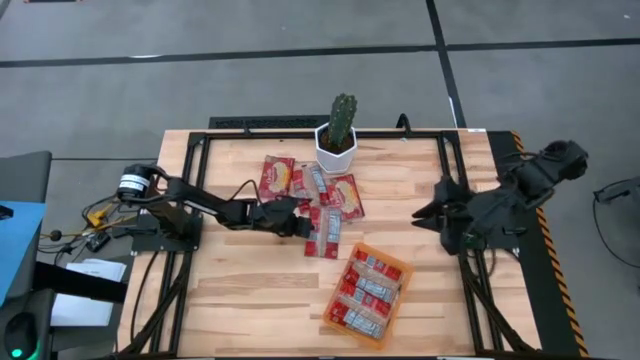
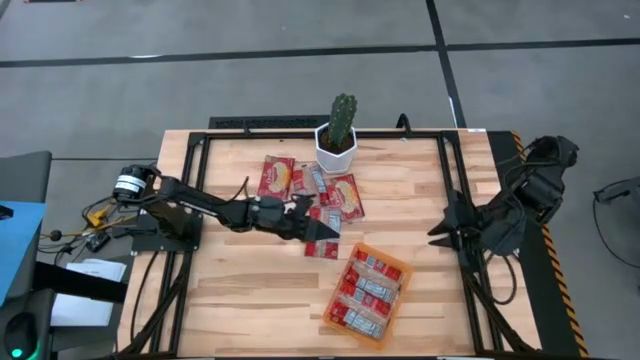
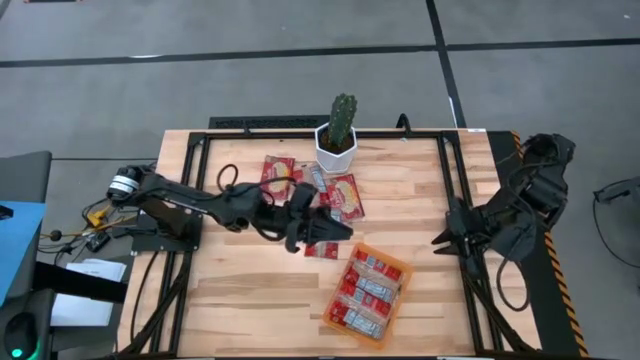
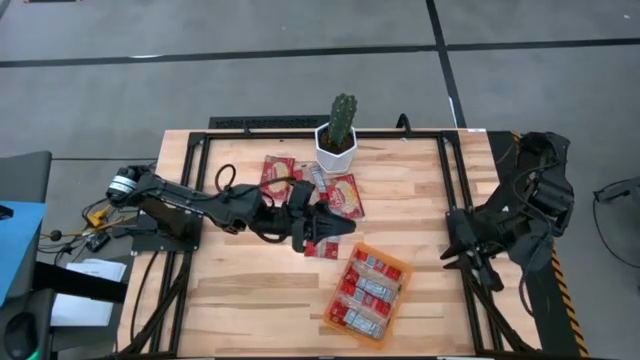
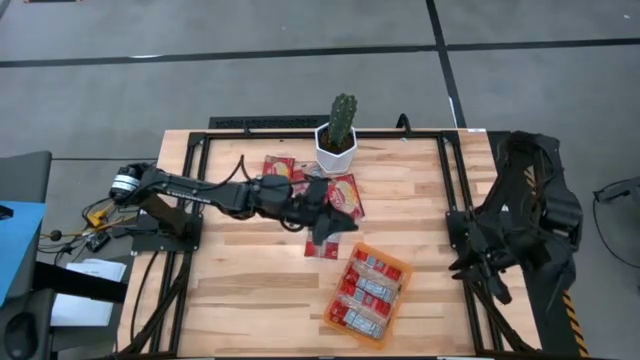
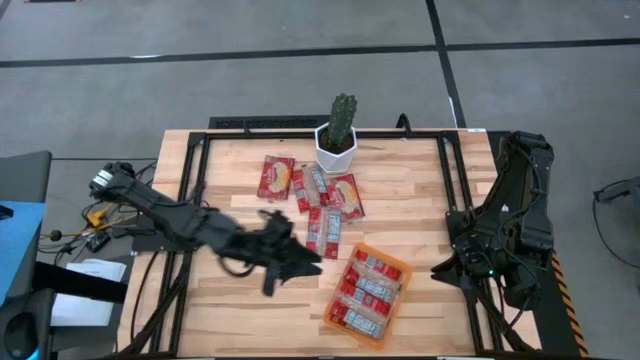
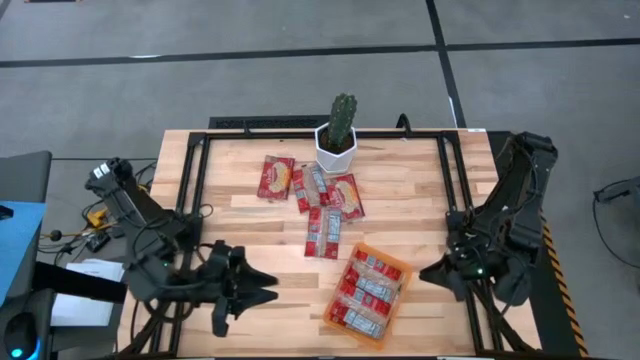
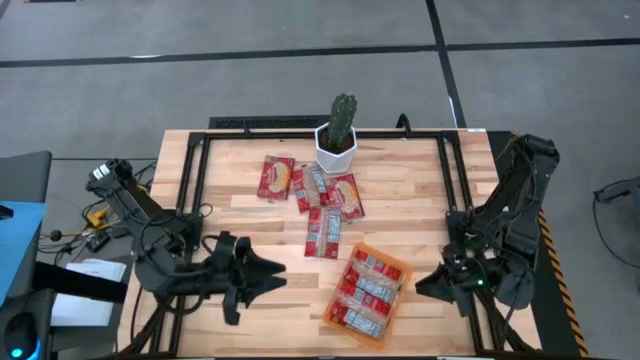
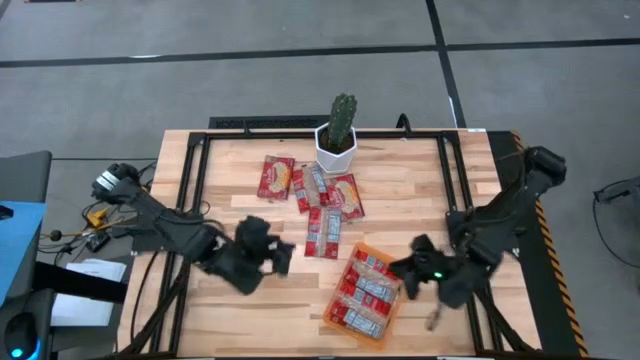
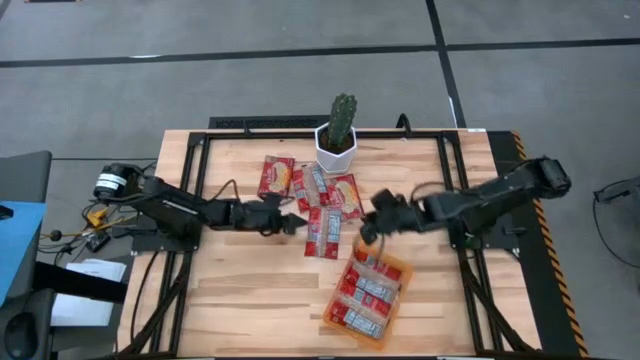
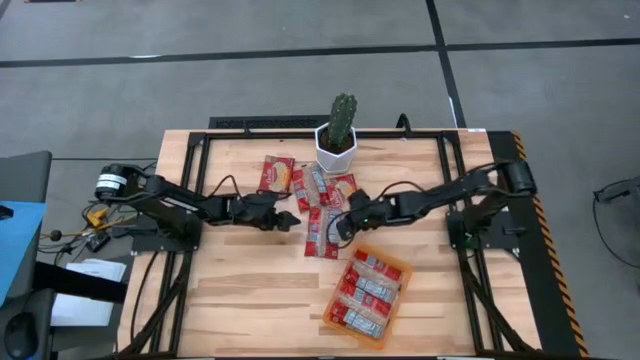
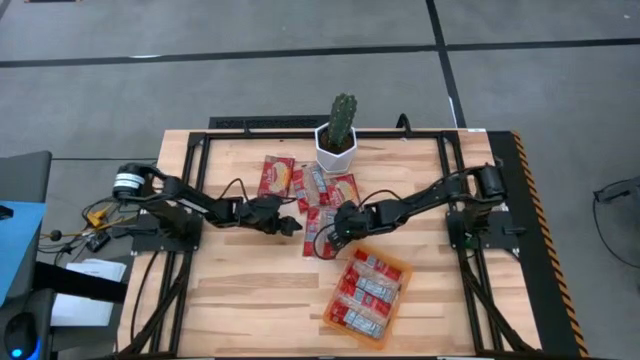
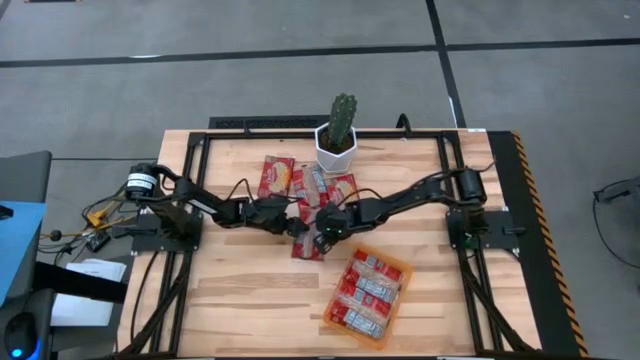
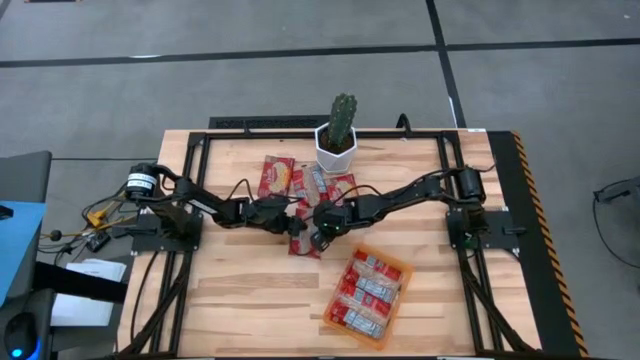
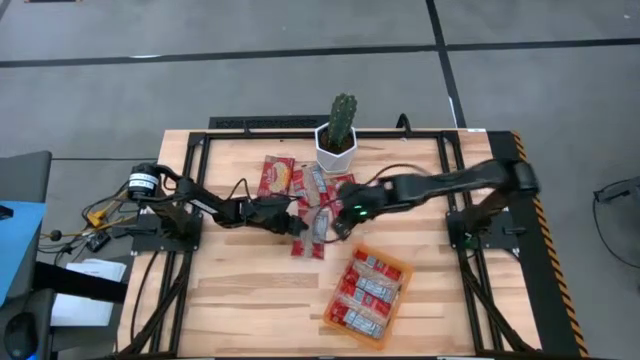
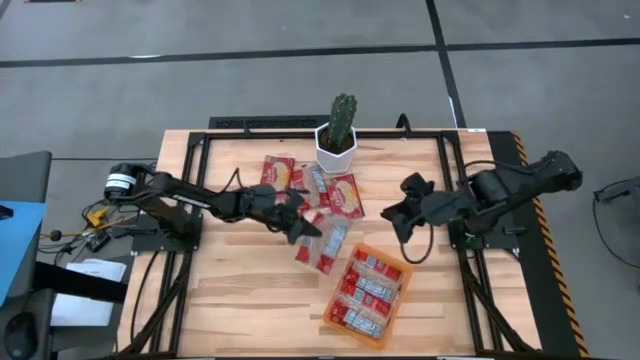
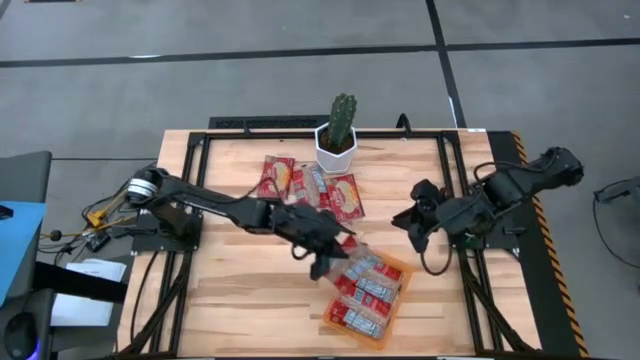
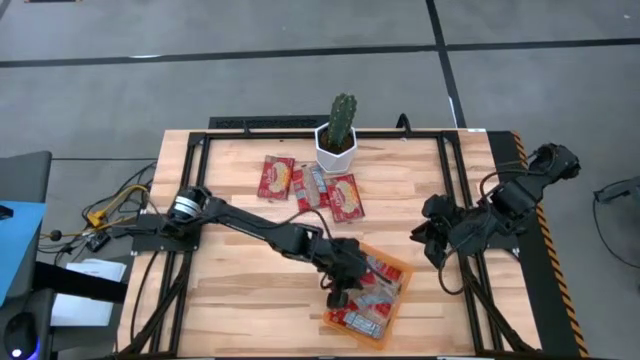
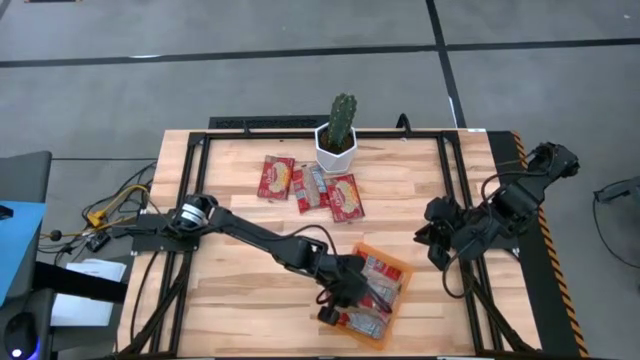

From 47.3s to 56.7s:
Task: Sort popcorn bags into baskets
Put the red popcorn bag into the orange container

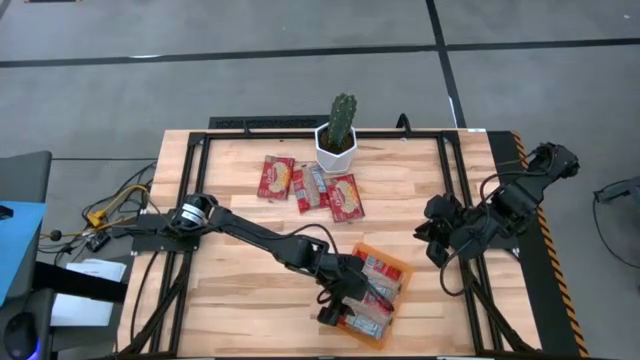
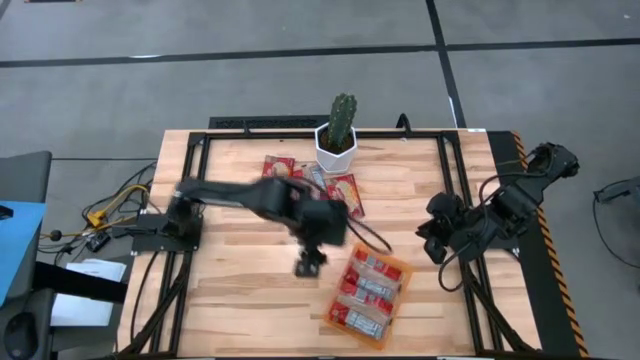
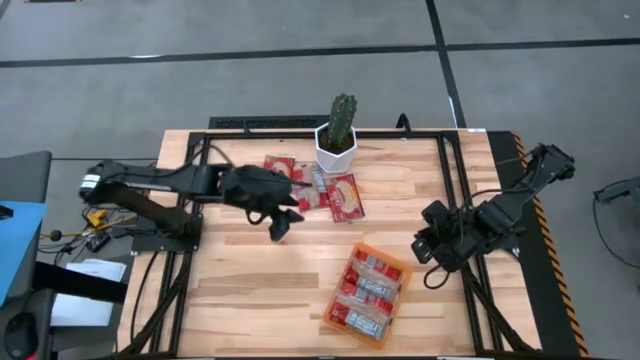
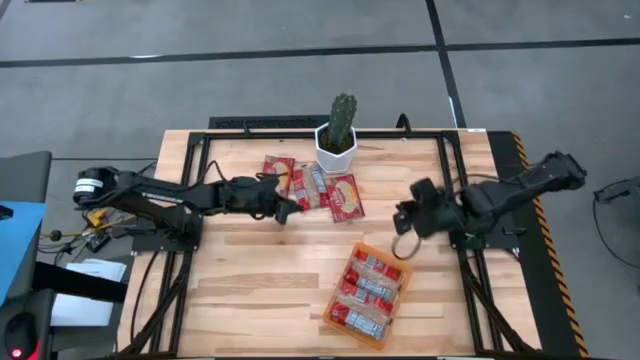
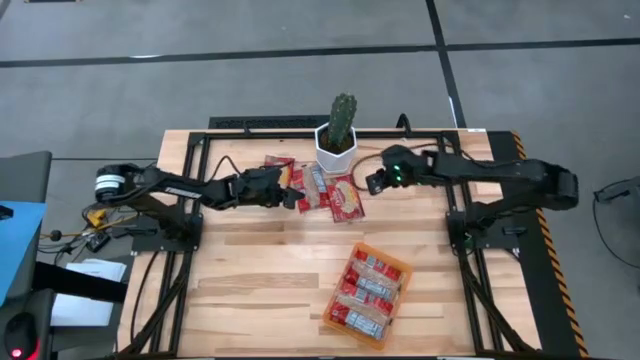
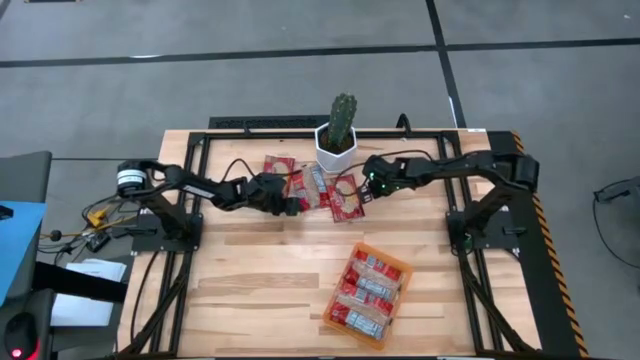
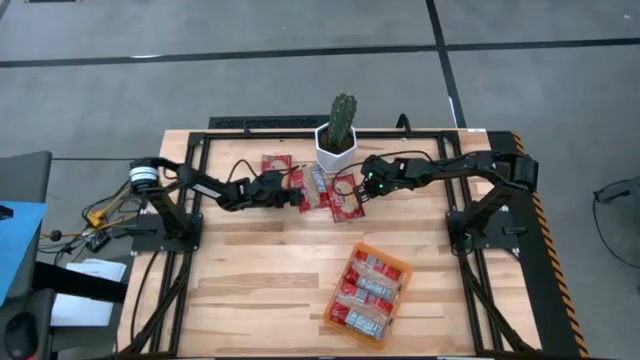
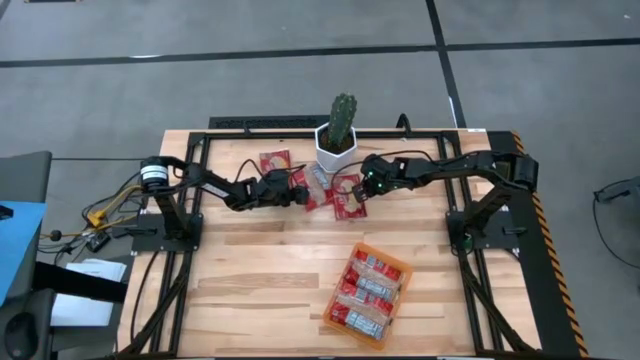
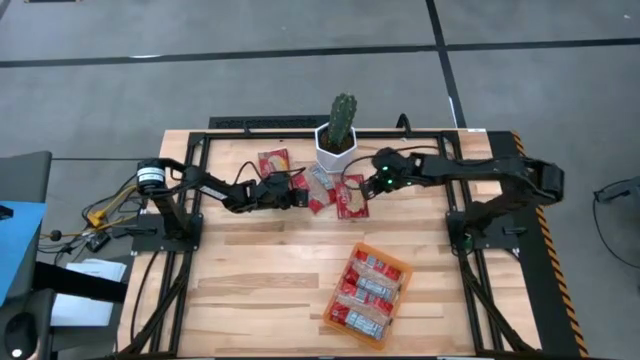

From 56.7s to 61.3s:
Put the red popcorn bag into the orange container

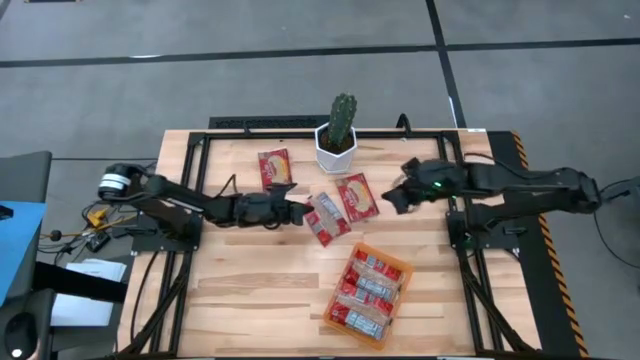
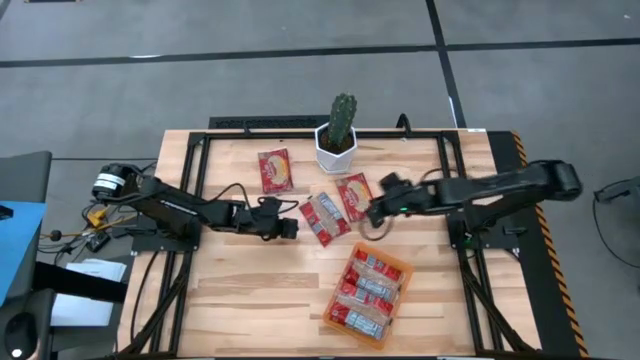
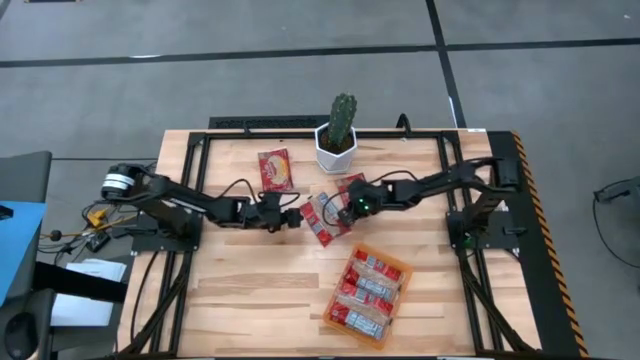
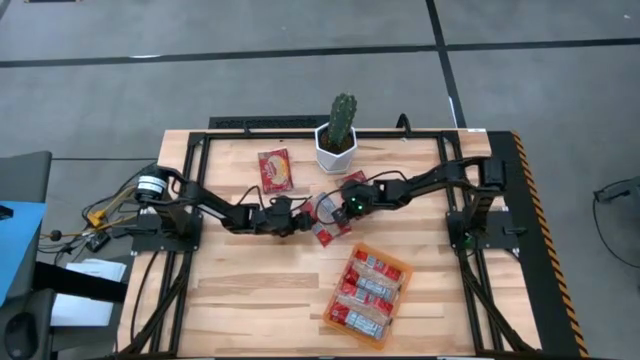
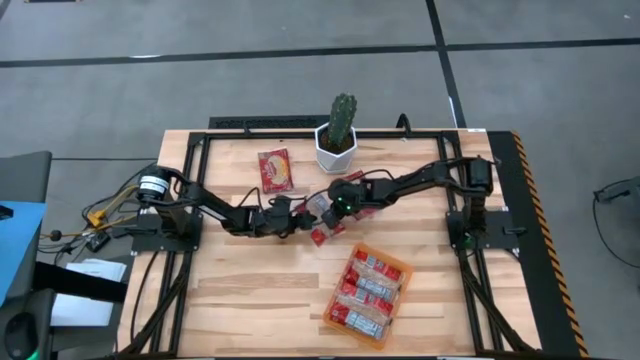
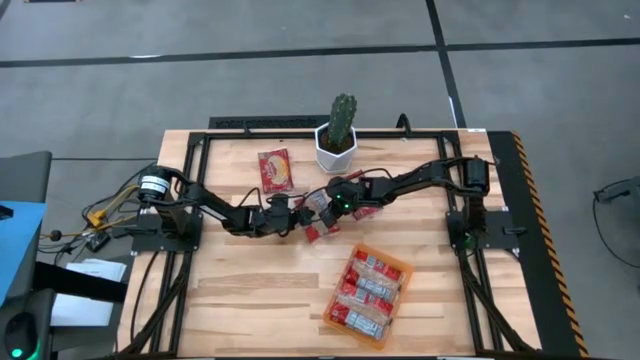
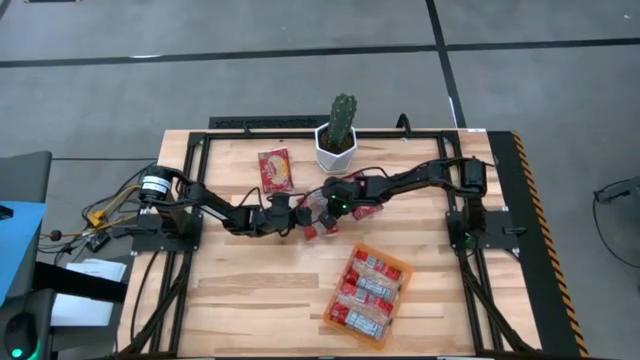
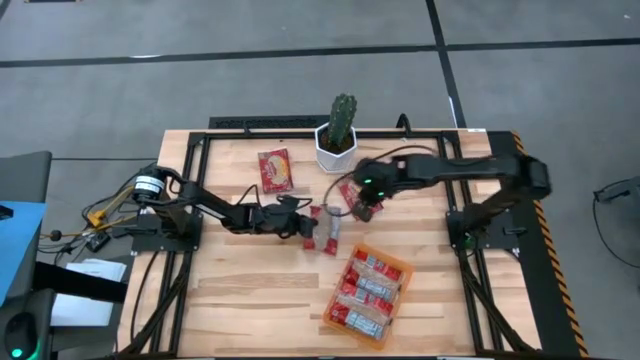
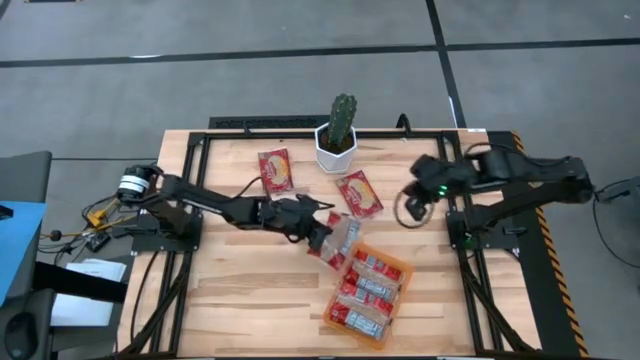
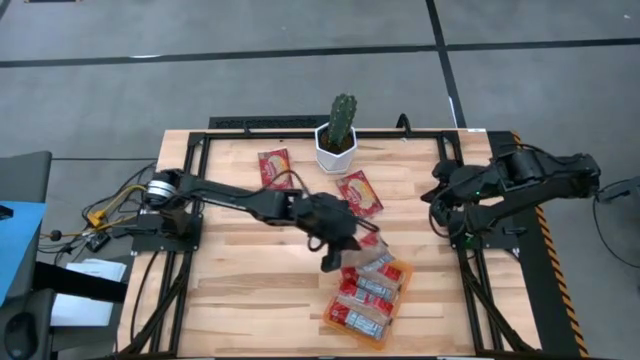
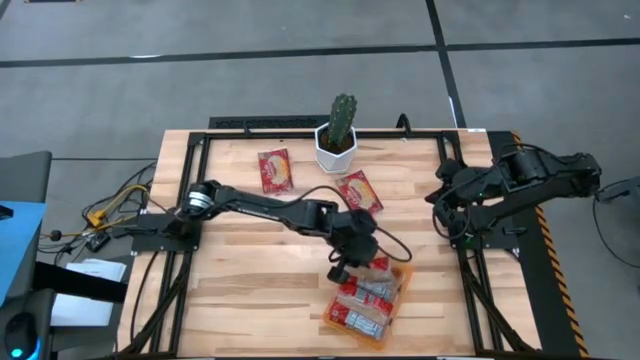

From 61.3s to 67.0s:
Put the red popcorn bag into the orange container

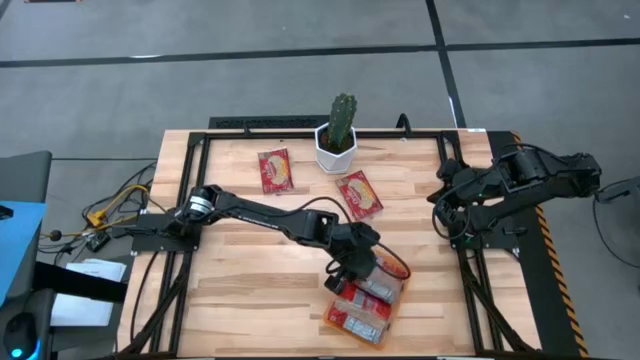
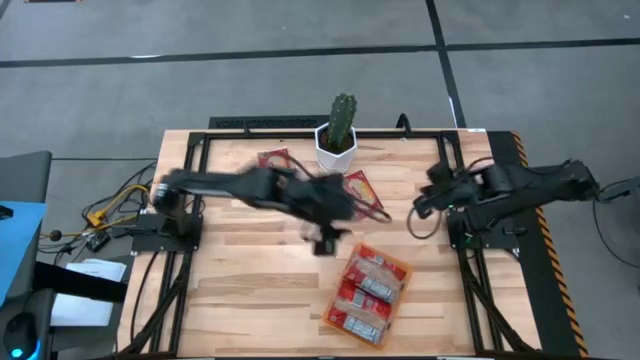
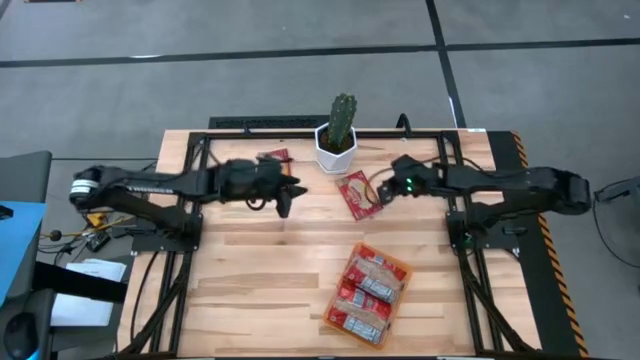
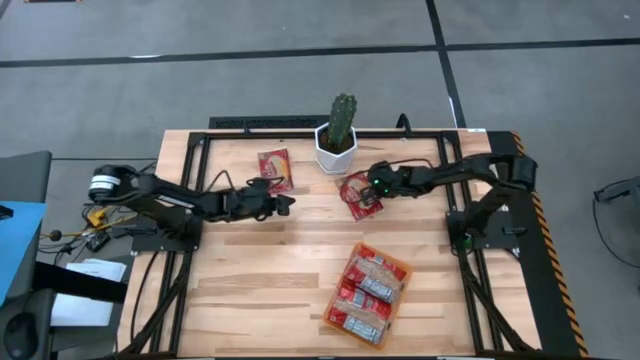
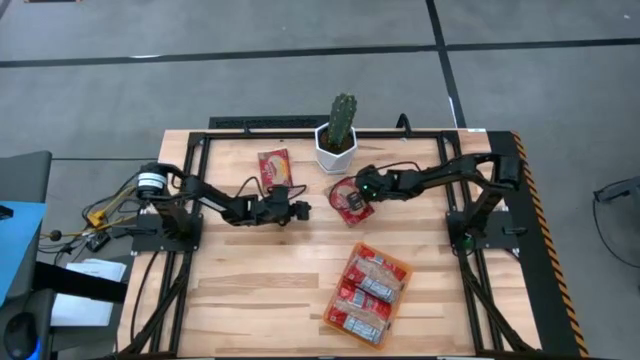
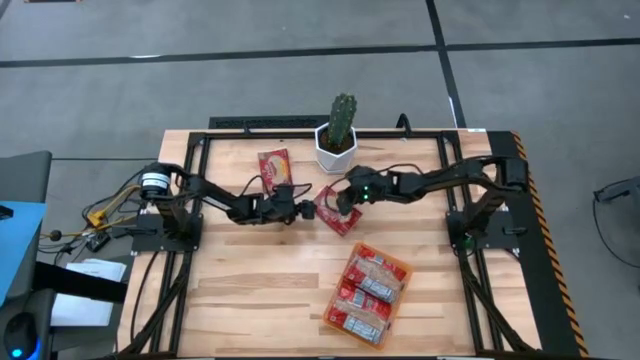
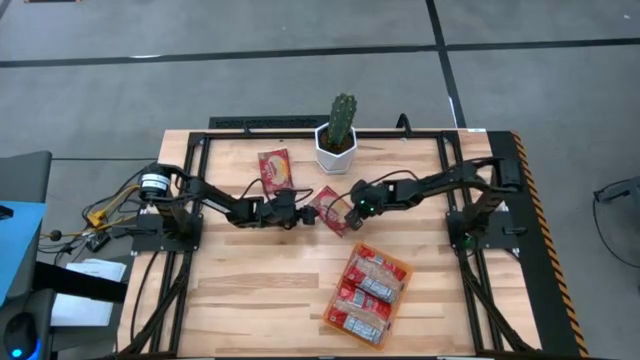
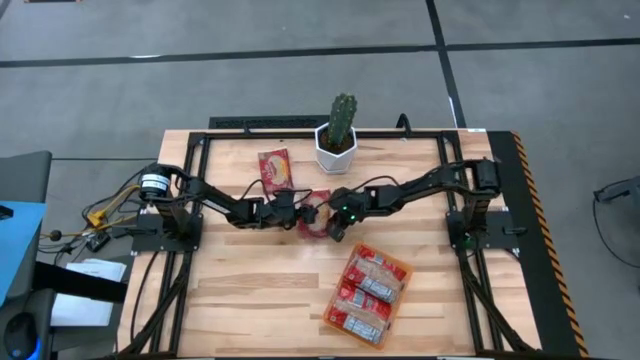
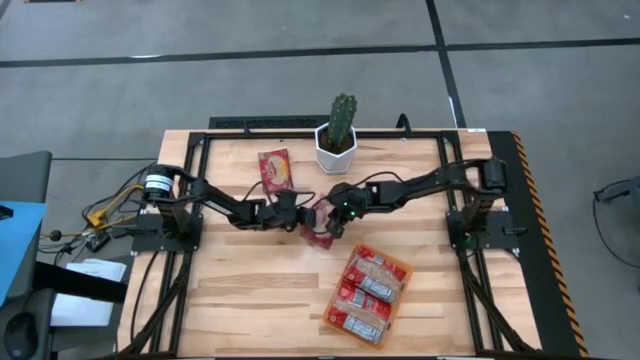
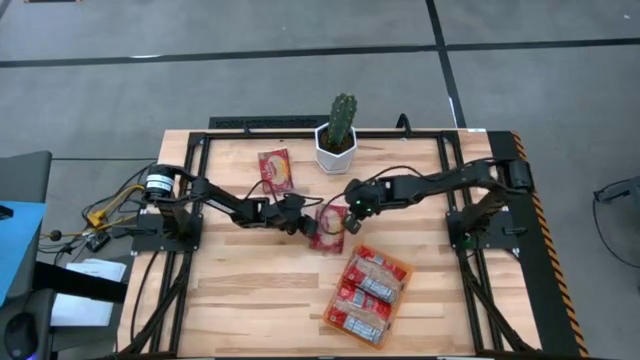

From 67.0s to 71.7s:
Put the red popcorn bag into the orange container
